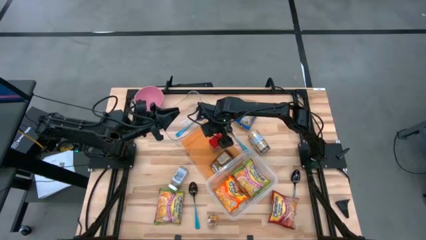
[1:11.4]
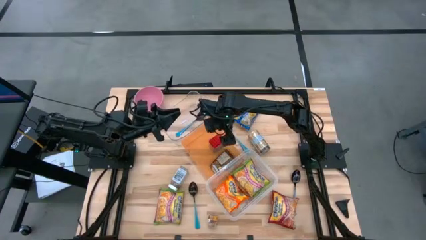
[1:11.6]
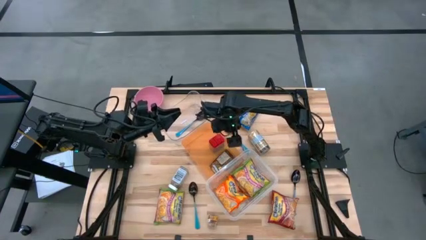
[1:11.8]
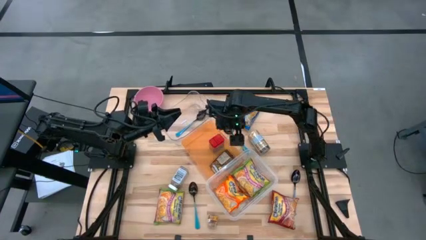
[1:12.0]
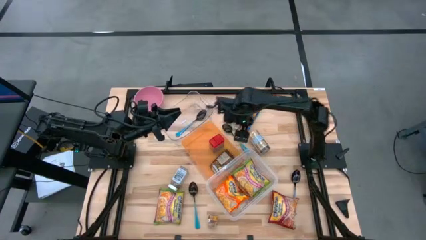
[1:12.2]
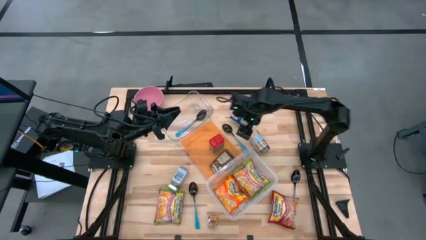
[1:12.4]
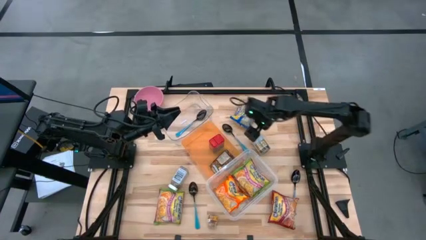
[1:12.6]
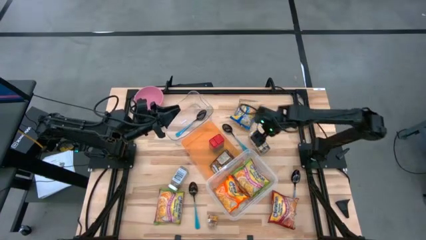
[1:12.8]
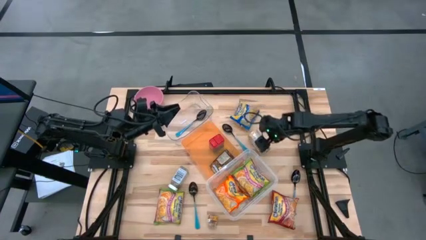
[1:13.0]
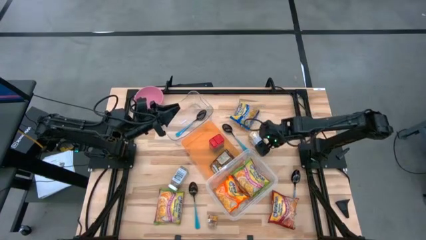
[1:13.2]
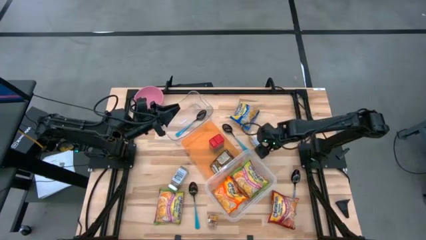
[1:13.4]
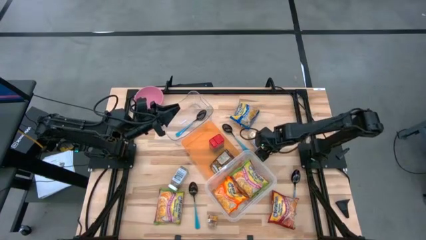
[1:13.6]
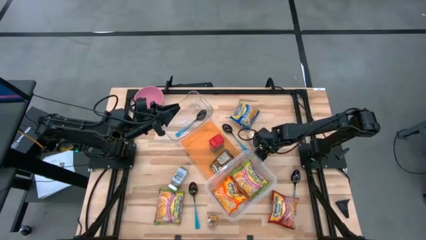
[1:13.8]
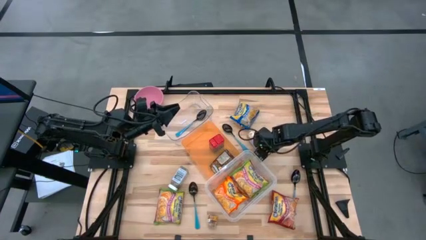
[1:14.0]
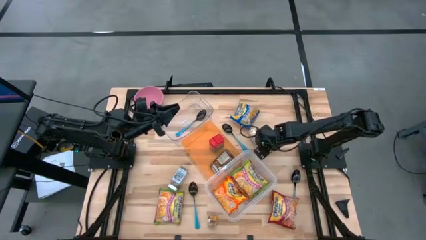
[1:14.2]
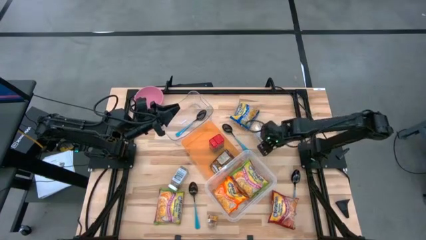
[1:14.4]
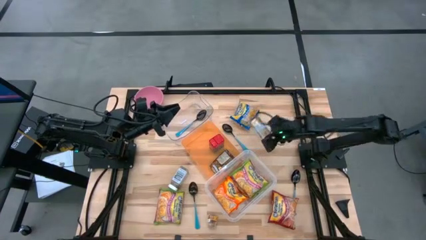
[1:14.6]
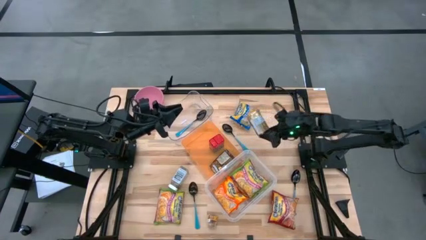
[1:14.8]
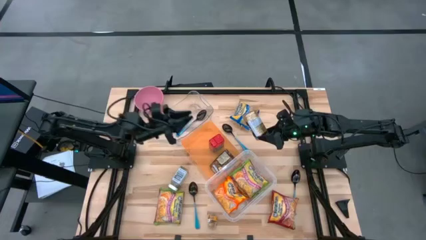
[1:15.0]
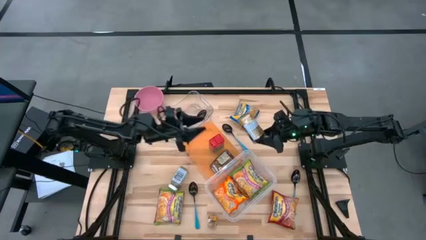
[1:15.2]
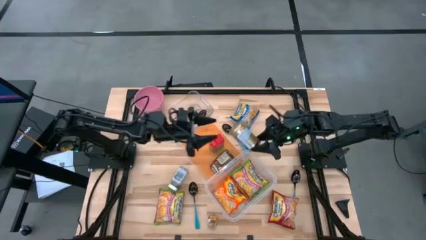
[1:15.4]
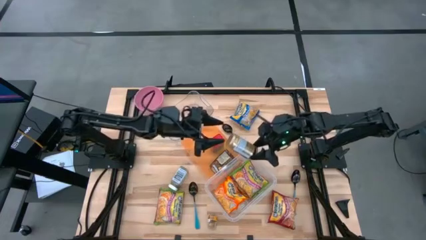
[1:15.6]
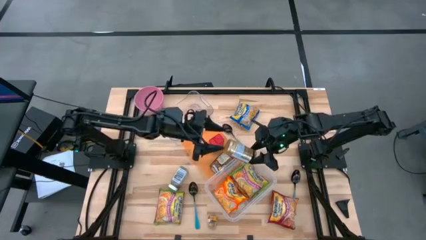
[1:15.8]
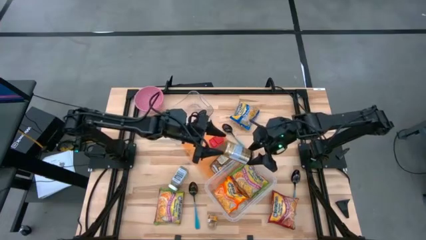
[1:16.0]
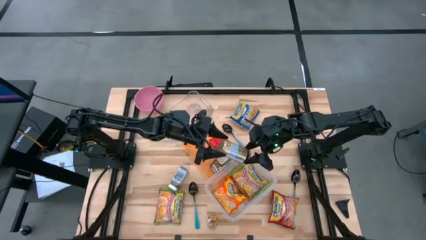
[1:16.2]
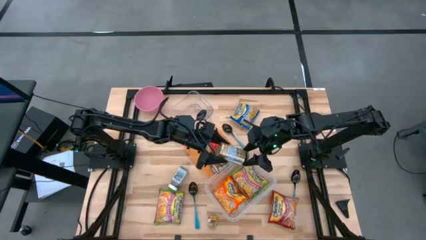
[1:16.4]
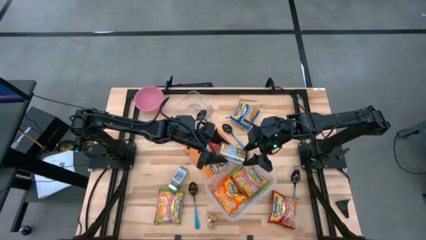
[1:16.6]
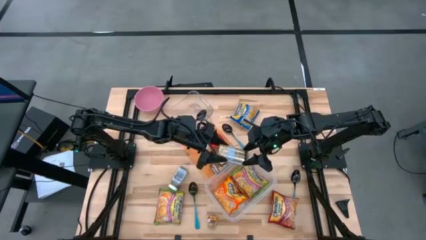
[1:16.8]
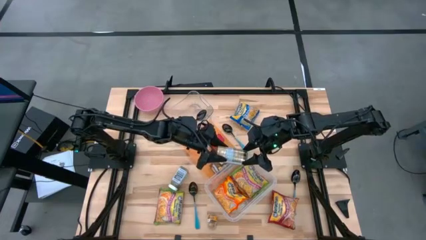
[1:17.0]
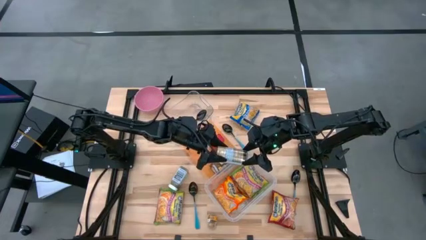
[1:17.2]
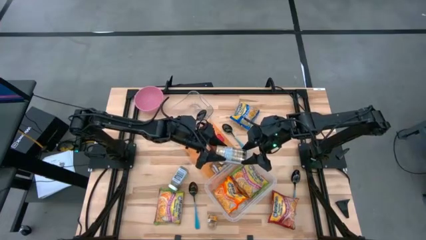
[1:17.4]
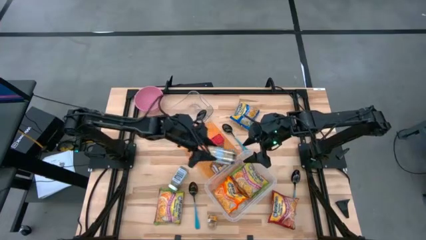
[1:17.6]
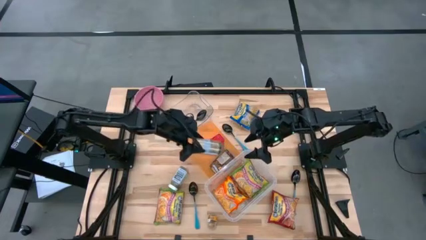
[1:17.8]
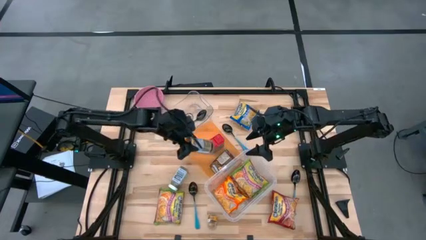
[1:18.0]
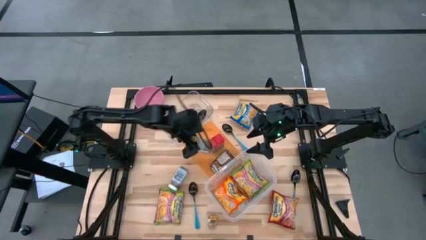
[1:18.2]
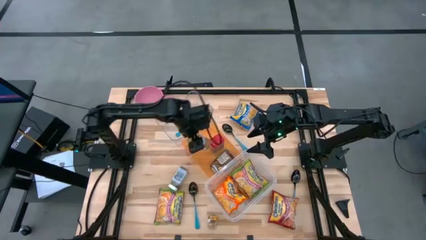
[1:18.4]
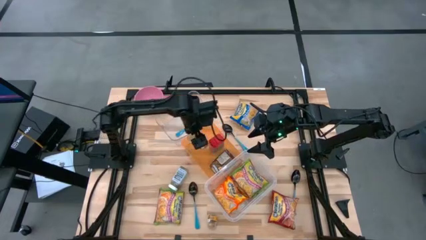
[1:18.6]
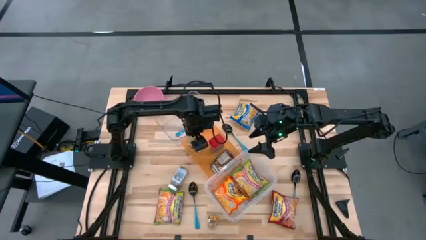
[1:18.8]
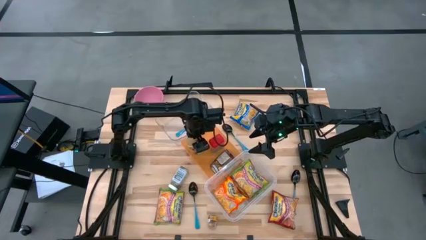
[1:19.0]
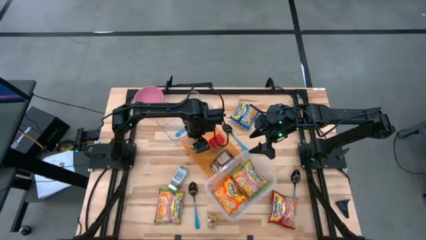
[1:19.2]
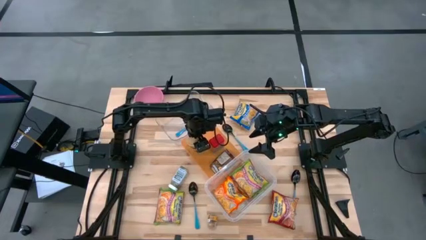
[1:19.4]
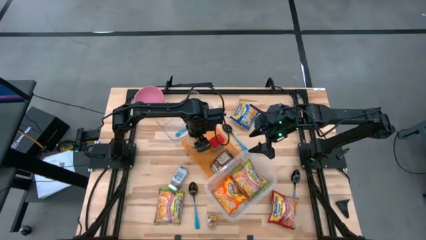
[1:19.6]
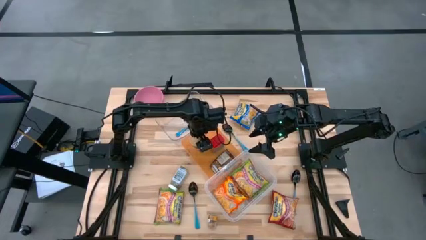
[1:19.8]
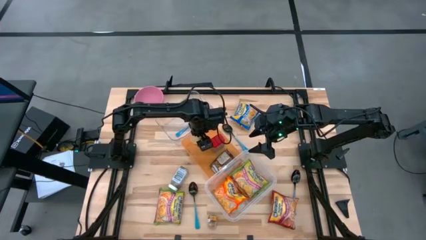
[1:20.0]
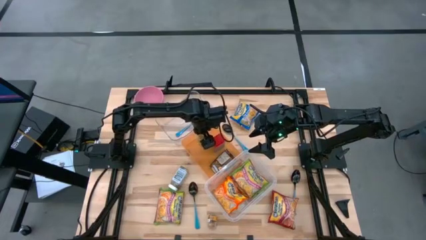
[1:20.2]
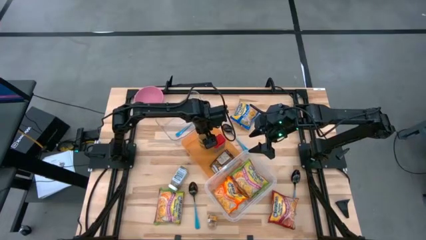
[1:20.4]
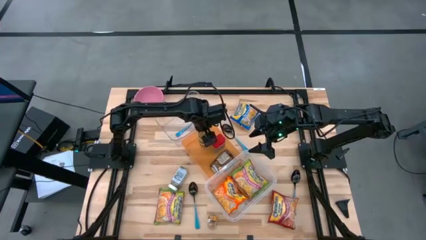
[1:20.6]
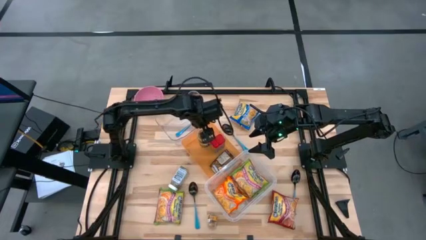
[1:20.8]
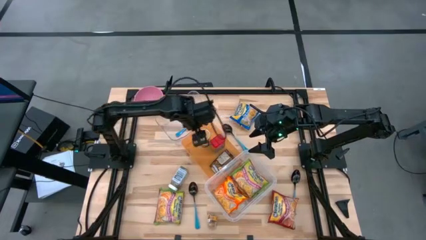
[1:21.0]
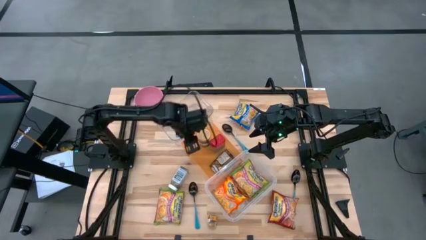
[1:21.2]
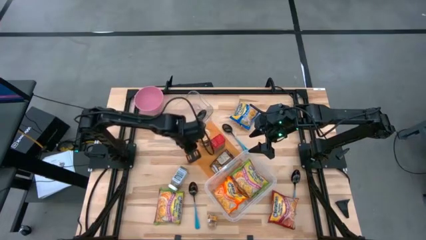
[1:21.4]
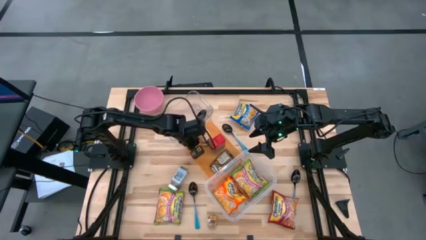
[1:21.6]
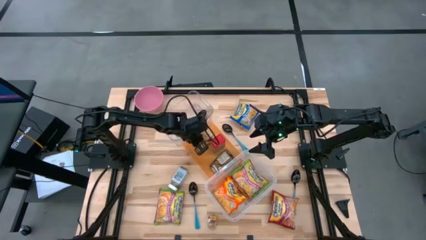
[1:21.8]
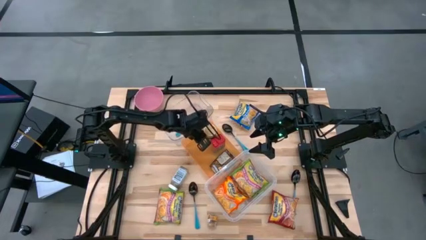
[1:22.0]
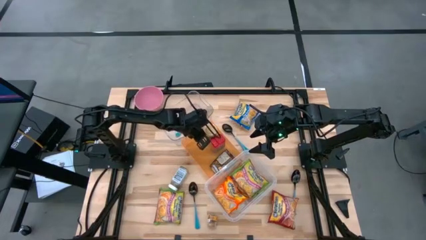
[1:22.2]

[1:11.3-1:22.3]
Task: Pick & Place Food Item
Put the golden seasoning bottle into the orange bin

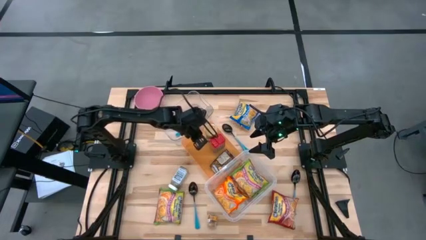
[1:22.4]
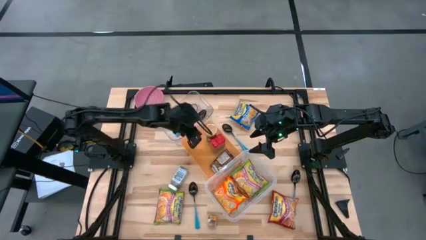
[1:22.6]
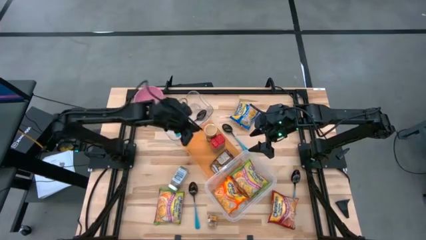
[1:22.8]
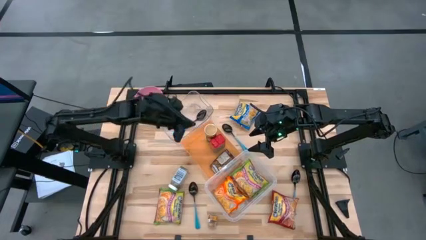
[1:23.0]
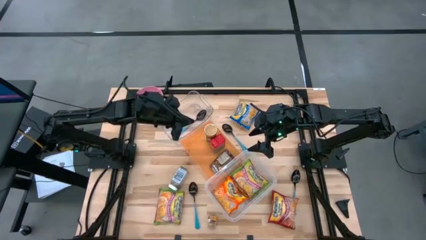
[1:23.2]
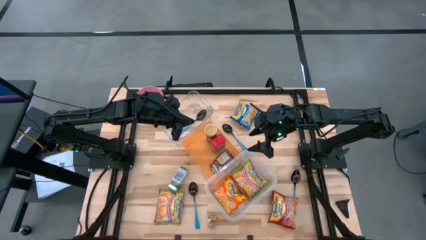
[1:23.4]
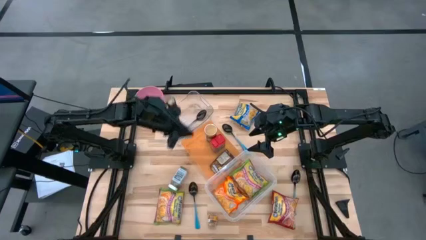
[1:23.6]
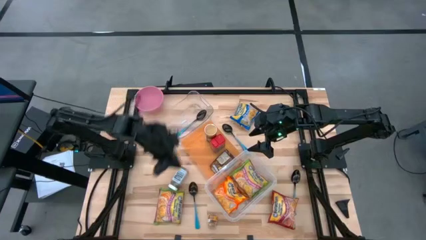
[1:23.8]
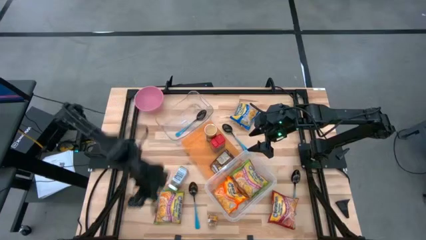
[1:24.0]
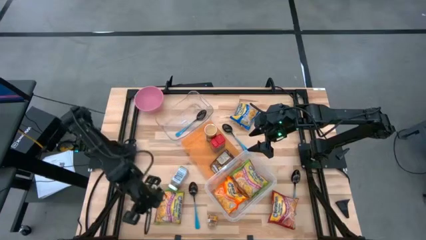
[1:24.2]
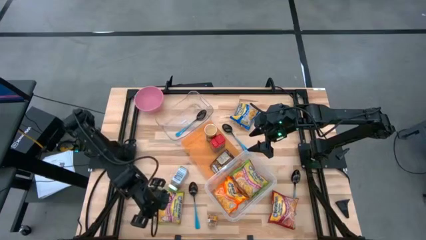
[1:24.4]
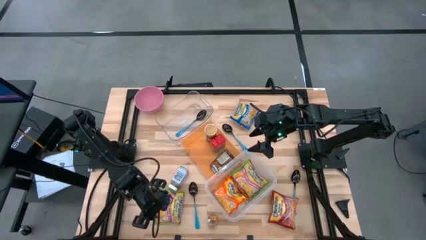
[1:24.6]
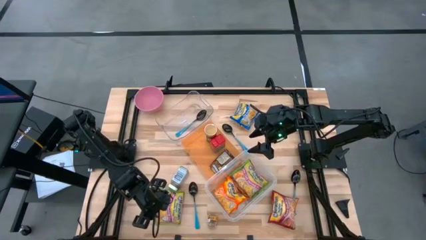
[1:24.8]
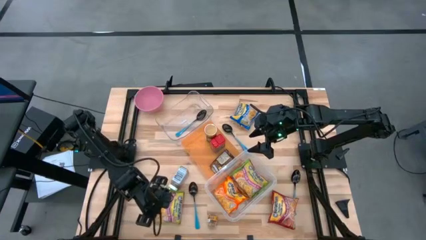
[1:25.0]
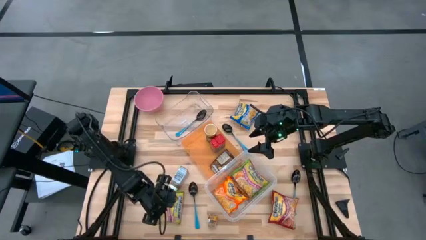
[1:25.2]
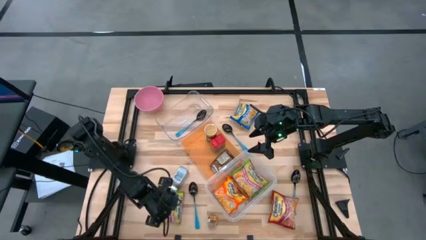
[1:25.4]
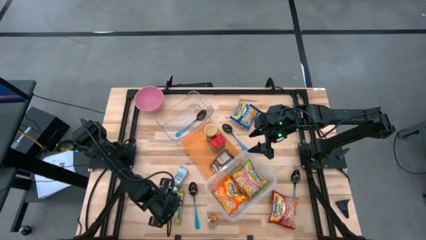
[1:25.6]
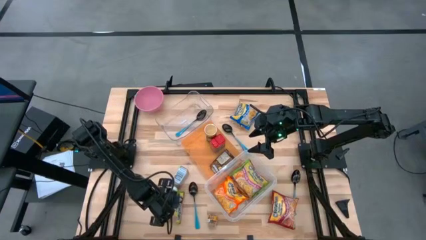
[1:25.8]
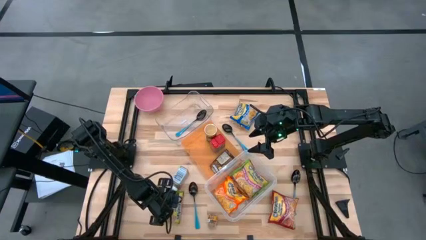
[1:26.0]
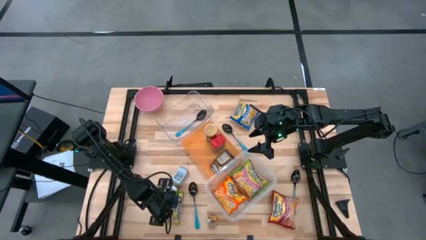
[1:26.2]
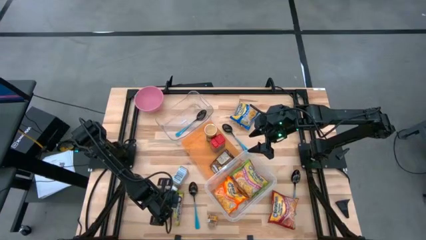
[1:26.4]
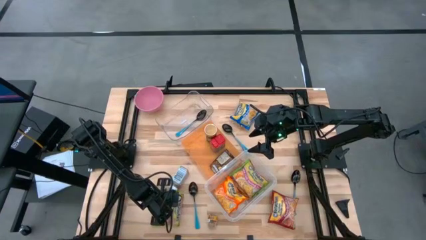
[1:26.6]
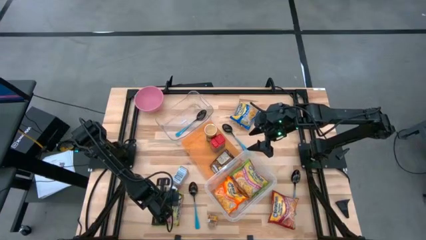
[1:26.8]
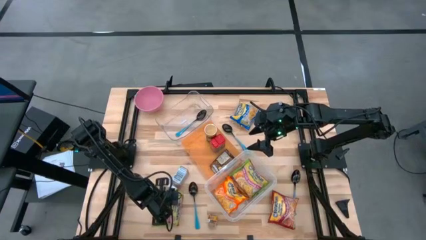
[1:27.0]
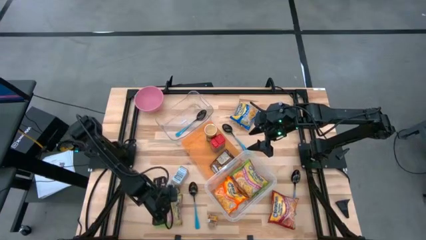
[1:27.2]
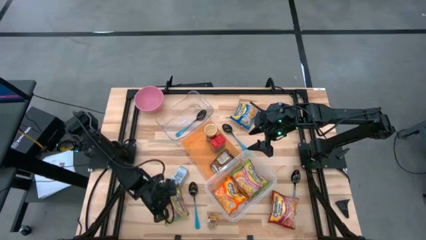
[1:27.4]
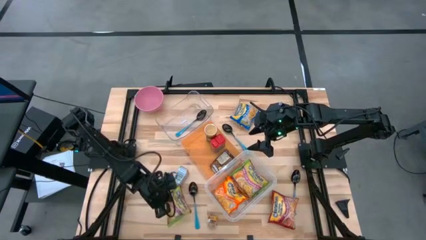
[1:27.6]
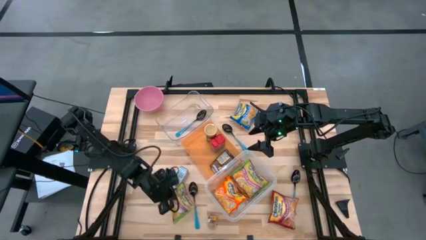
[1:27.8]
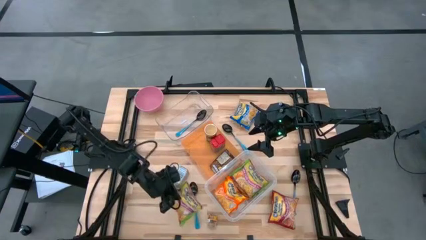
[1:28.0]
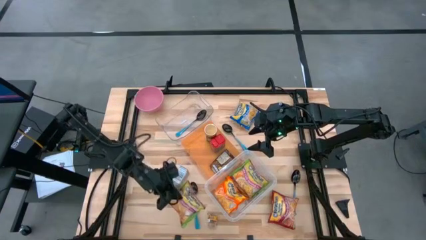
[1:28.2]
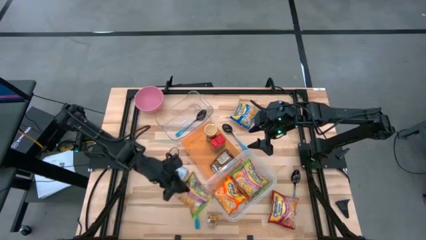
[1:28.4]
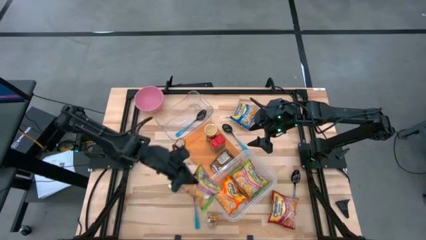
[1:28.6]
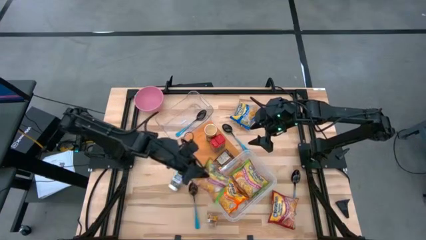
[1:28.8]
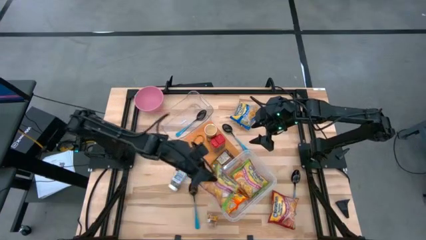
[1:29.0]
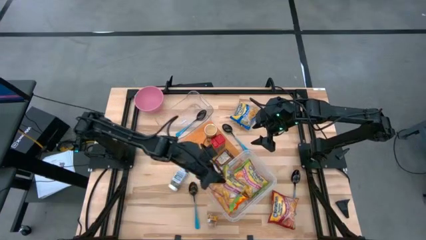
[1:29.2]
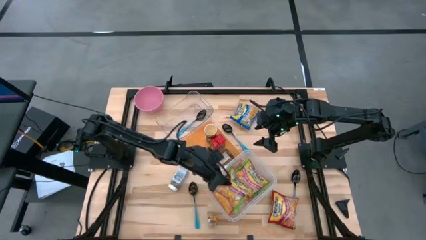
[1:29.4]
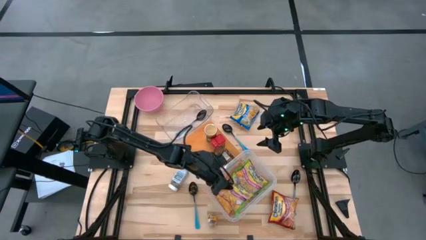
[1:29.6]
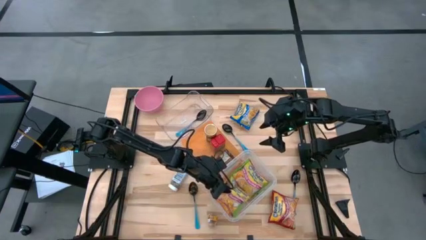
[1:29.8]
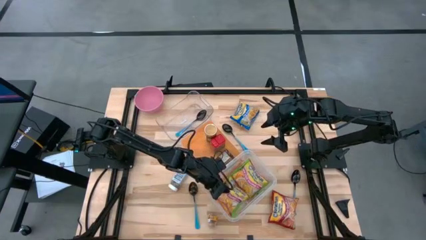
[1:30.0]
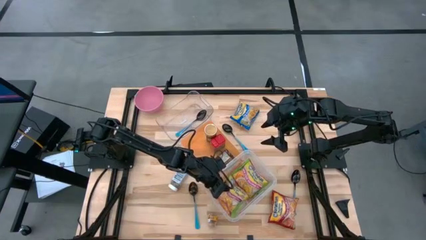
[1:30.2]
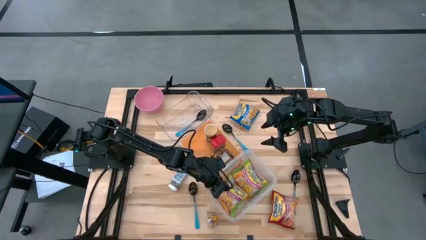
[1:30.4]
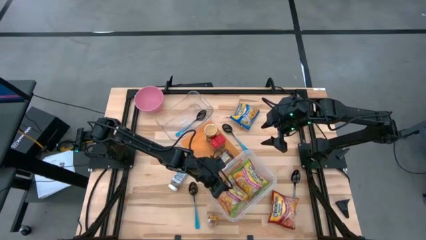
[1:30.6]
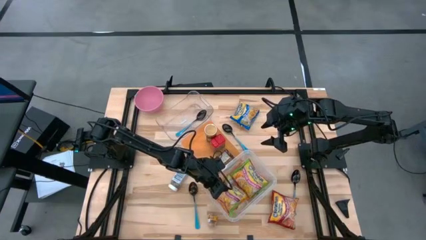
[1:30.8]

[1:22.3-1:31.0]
Put the green noodle pack into the bottom transparent bin
